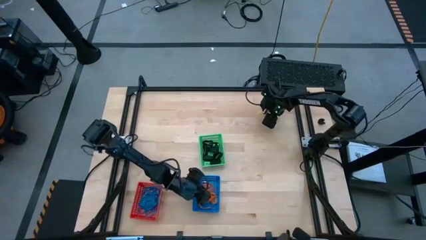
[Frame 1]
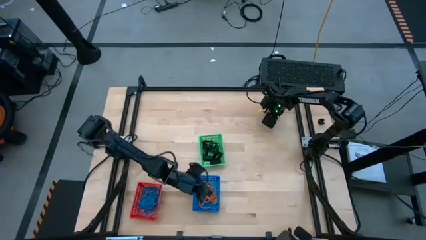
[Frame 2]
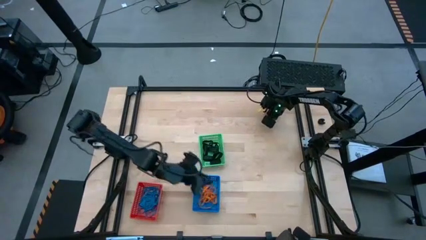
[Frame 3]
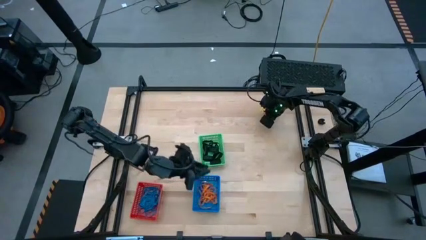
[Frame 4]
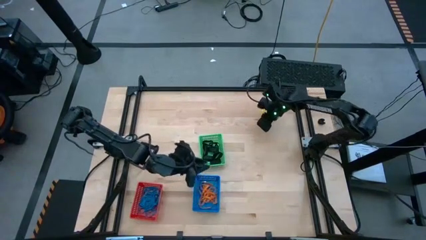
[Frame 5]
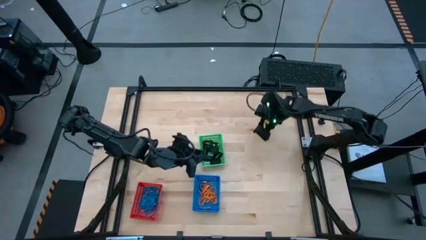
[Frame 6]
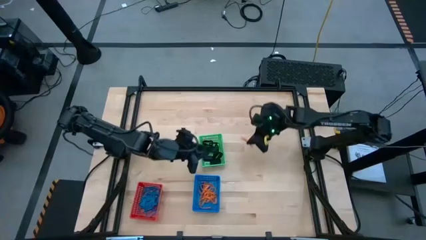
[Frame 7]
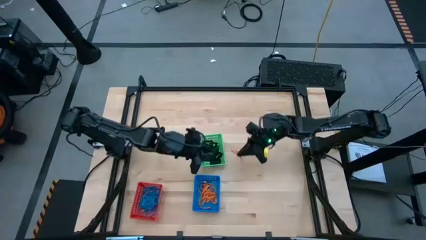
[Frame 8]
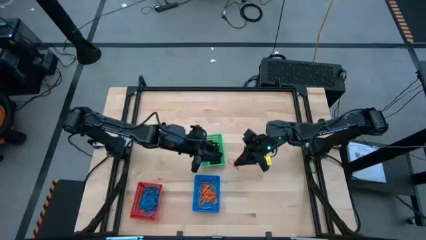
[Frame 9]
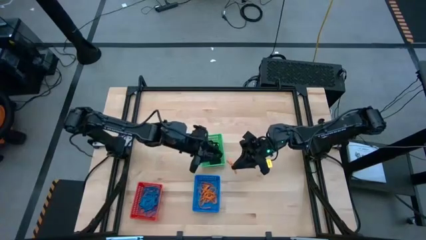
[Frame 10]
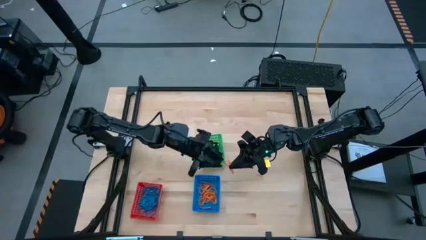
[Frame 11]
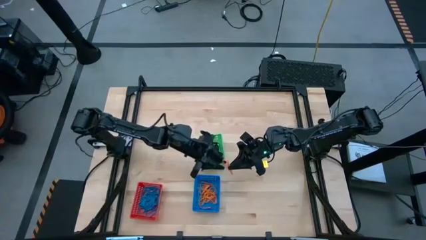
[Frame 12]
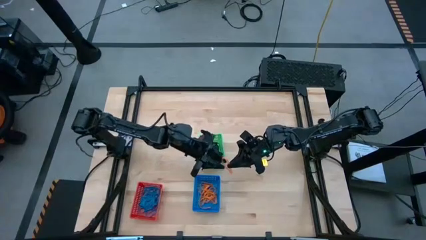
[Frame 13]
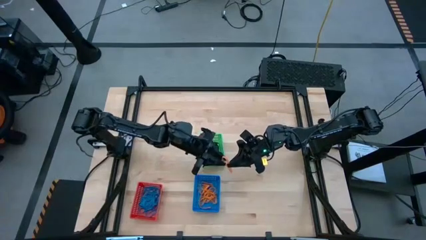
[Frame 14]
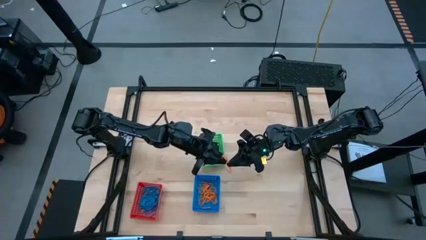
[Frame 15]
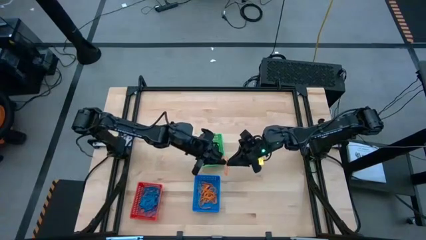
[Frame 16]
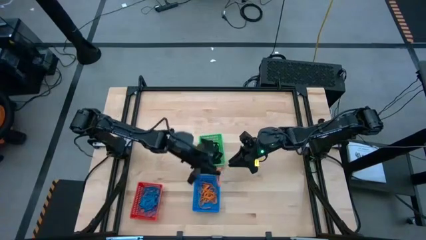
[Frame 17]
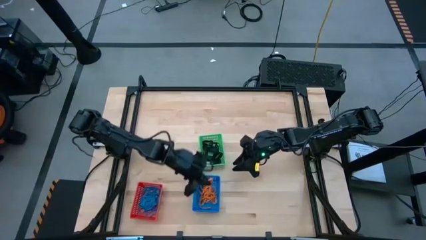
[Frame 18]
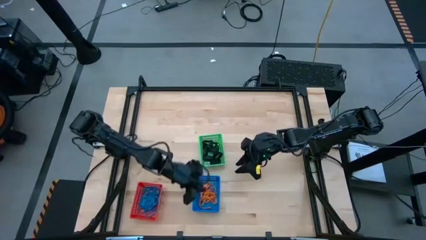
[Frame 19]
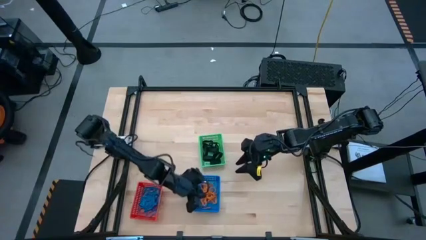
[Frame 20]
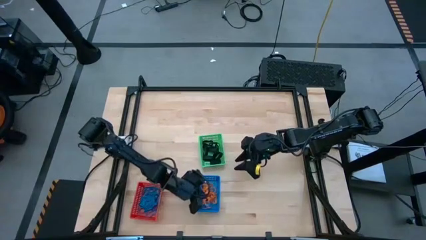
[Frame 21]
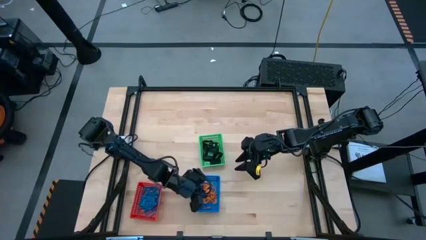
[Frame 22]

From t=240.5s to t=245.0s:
Task: Sort rubber bands into baskets
Put the orange rubberband into the blue bin

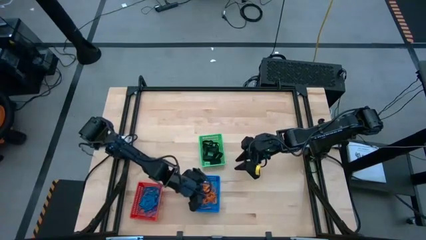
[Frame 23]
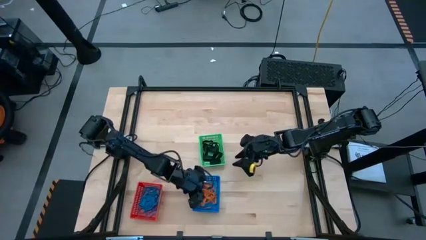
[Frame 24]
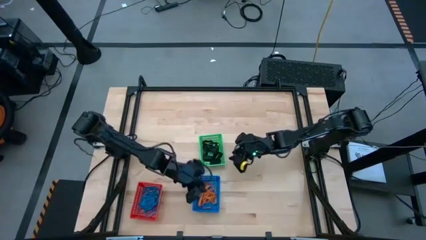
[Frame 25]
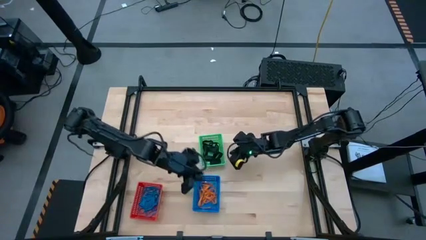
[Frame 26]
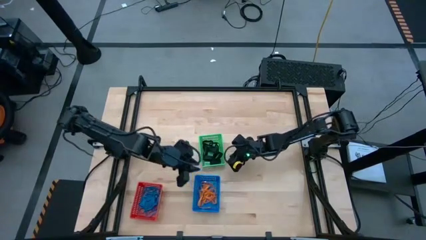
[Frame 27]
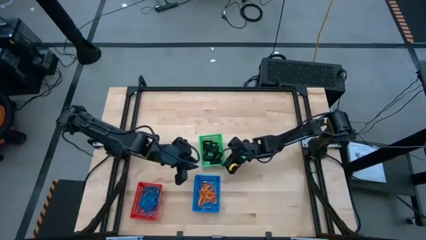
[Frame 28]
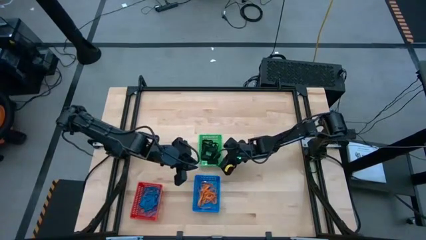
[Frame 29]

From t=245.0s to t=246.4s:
Adjust the green bin

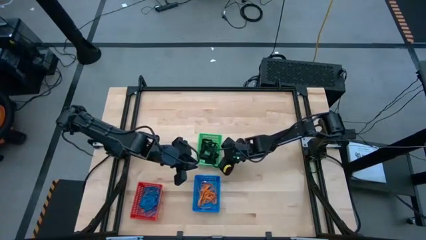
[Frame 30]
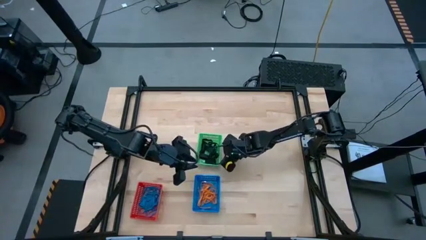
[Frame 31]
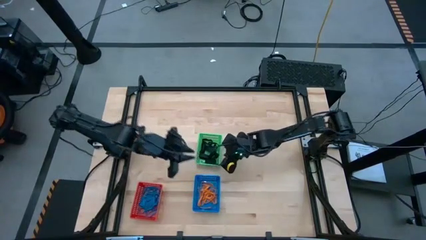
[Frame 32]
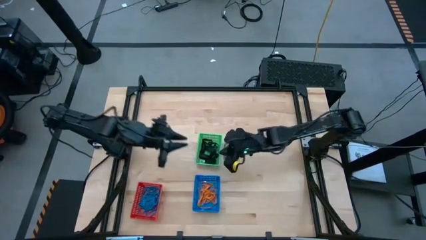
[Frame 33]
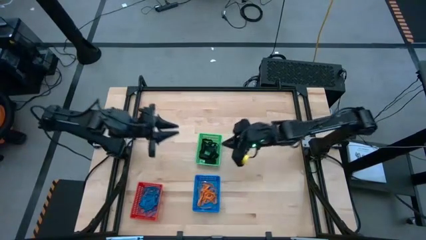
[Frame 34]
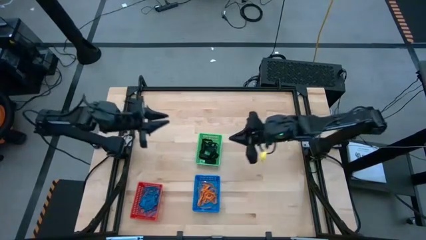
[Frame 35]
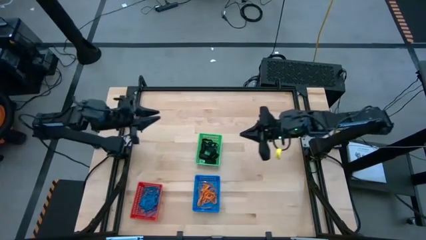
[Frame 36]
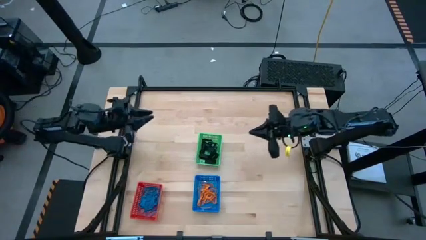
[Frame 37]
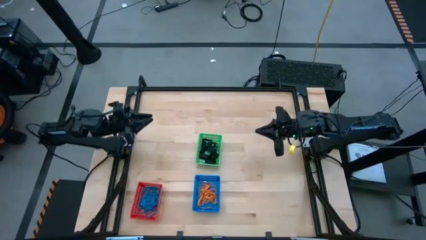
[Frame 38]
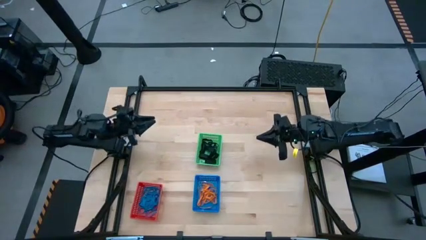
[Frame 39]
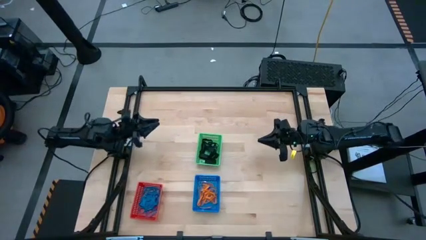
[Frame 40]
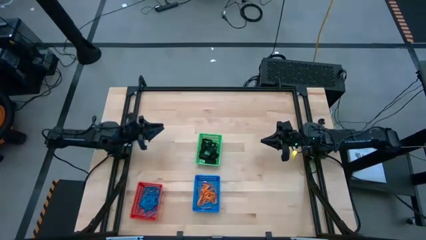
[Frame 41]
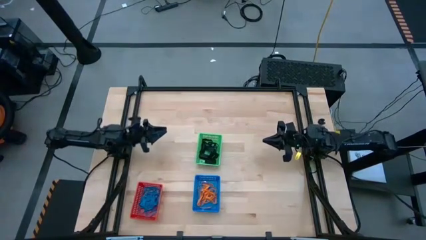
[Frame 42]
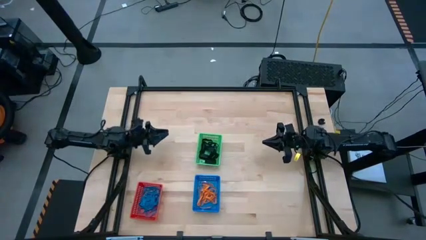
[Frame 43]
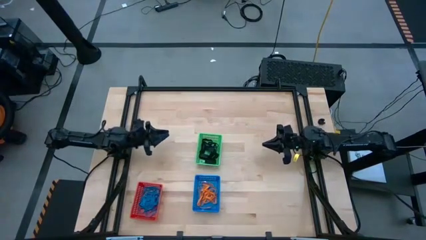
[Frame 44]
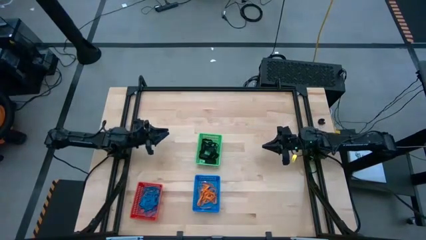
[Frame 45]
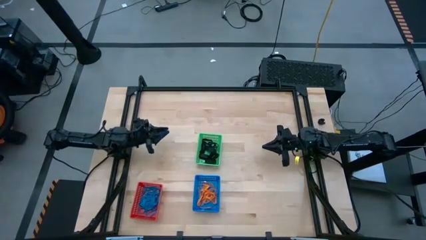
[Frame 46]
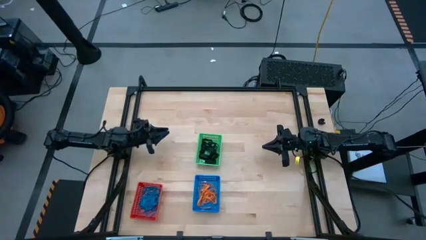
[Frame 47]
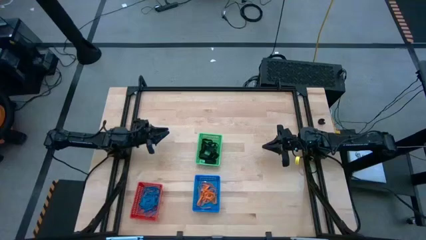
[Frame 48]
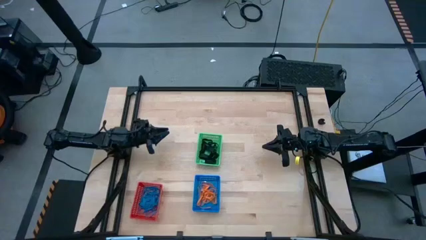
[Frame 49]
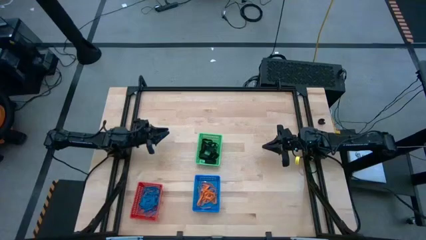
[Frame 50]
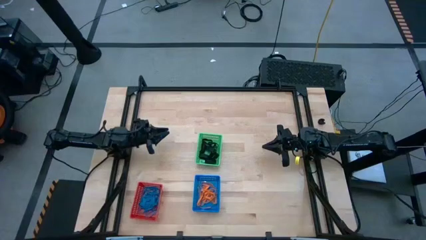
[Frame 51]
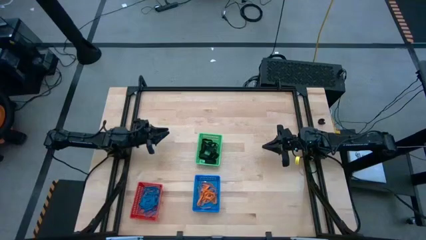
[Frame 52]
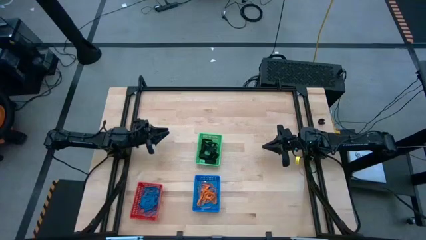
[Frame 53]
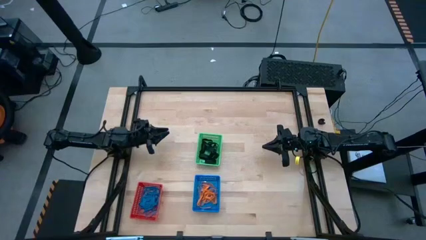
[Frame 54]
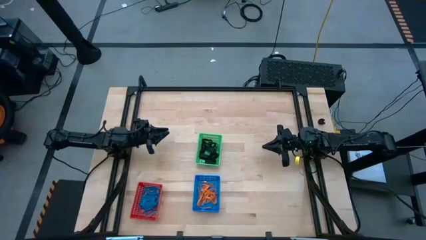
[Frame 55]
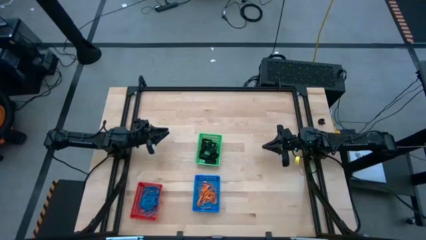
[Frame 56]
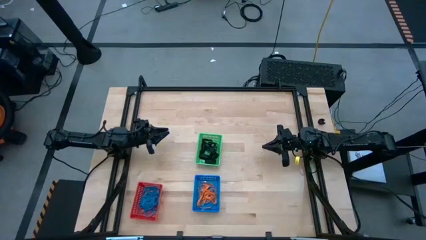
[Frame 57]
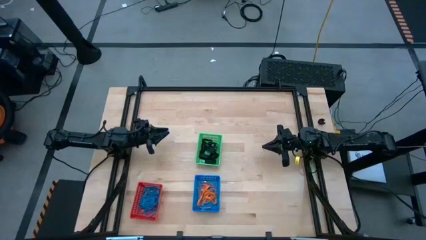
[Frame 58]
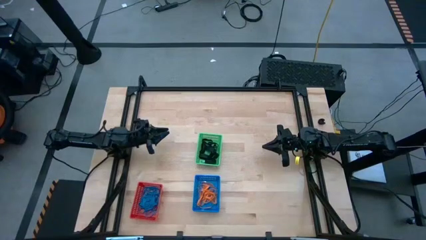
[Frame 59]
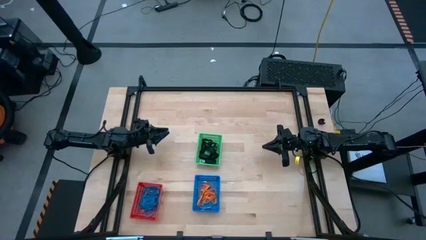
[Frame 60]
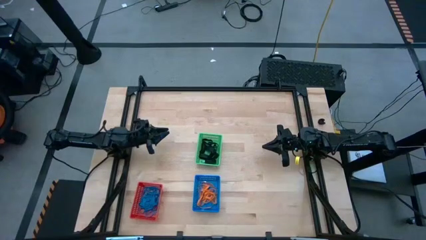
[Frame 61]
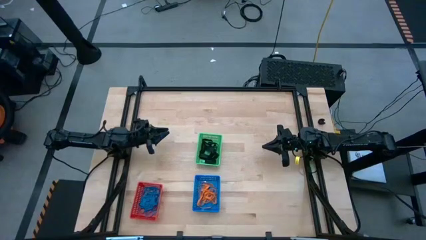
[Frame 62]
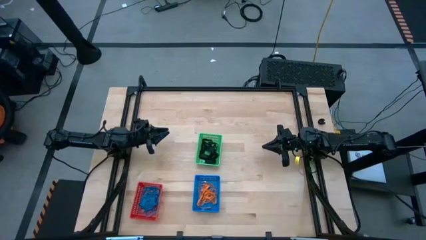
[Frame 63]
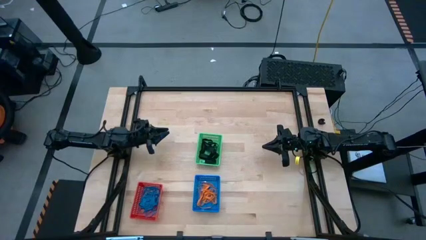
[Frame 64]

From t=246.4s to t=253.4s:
Return to Home Position

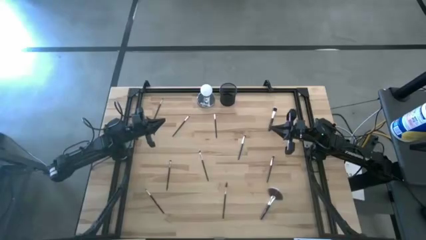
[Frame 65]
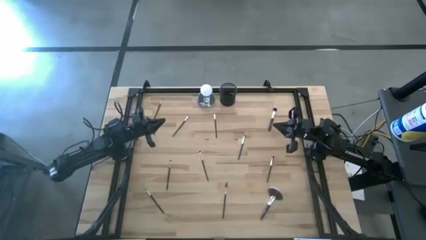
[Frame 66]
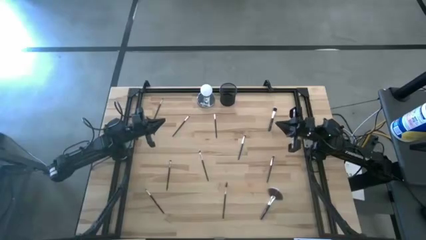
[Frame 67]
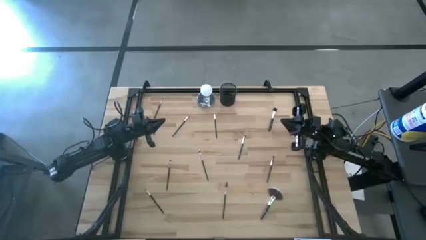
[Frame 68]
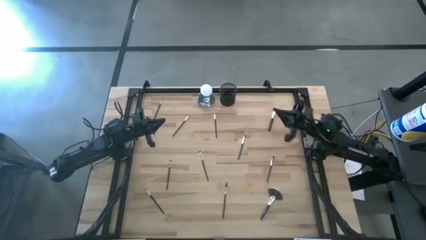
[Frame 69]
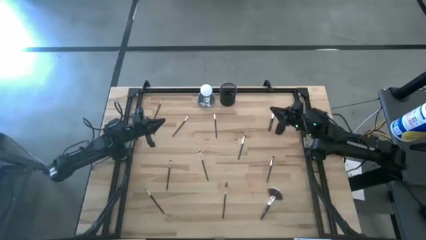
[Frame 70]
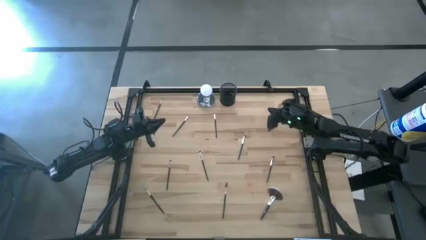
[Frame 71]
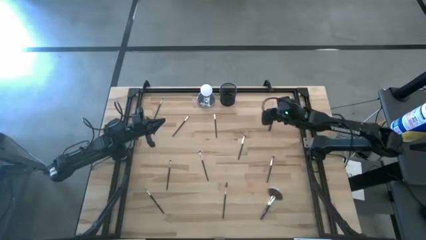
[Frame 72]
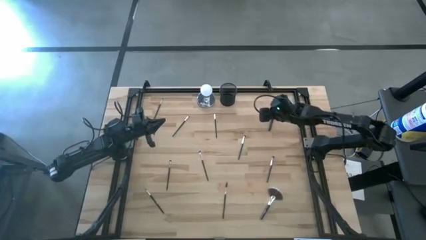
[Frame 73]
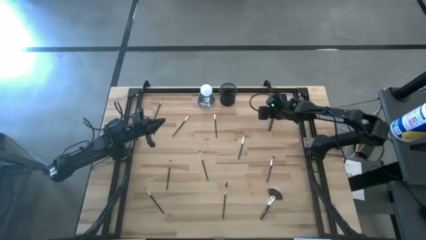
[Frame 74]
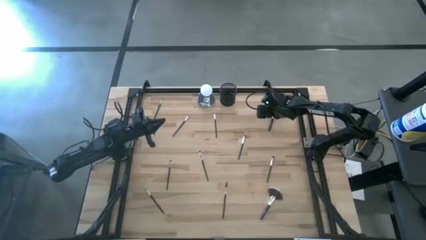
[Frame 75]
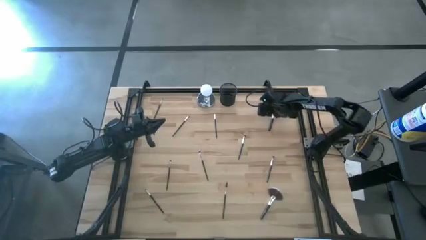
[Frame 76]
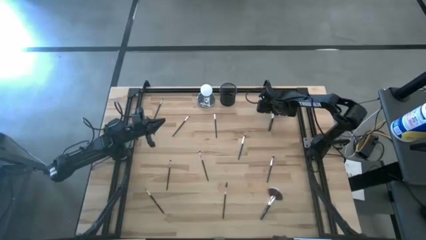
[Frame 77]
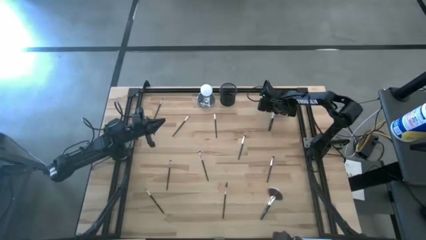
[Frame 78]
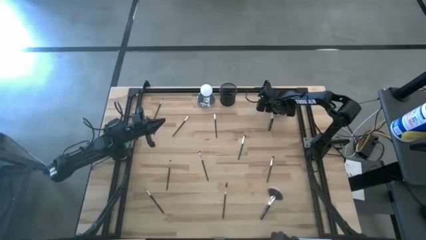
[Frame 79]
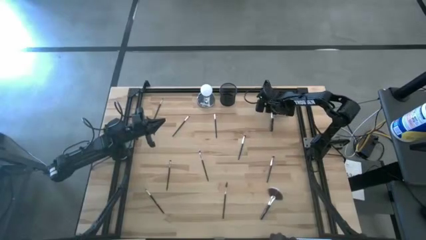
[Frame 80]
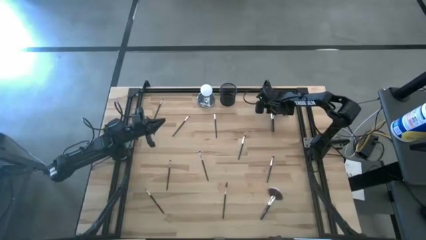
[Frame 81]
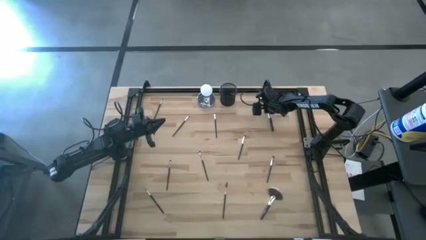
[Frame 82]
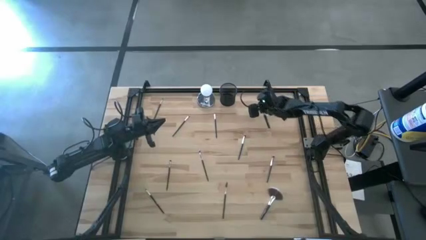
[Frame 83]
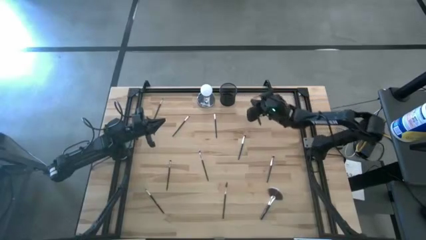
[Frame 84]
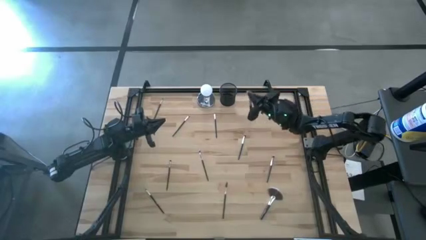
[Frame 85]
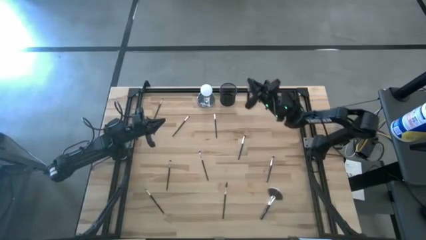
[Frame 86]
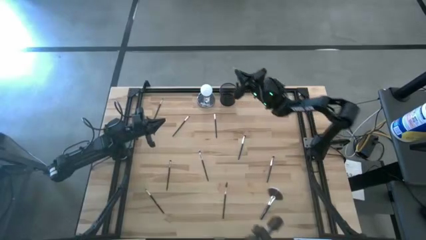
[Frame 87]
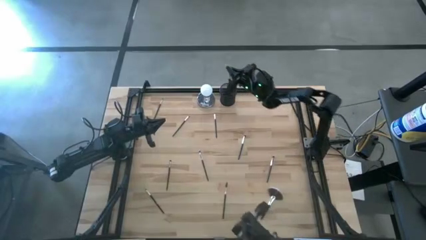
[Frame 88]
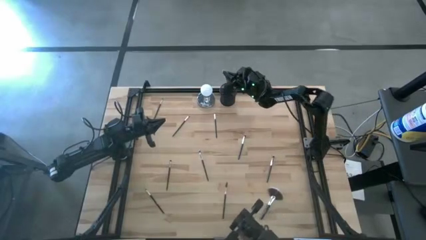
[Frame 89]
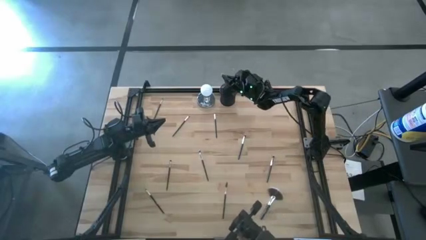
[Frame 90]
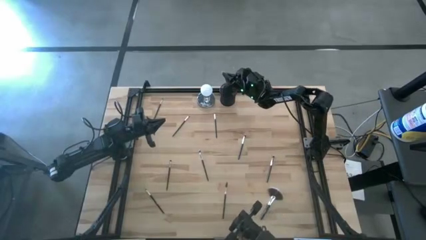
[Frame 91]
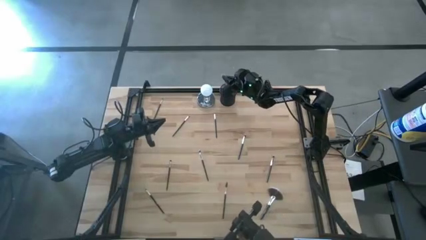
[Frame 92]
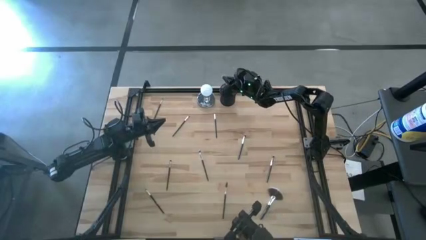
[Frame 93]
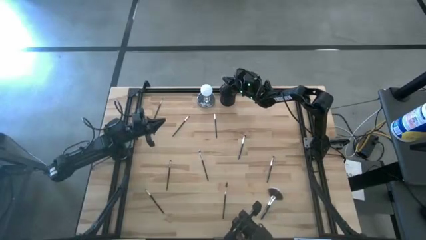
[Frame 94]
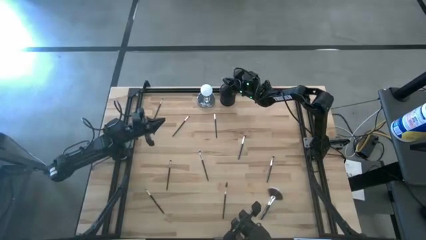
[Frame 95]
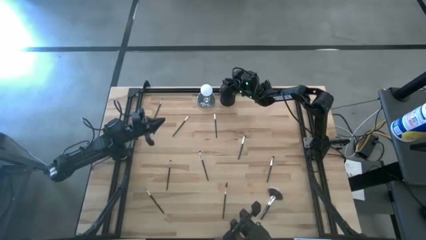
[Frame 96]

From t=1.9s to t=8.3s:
Task: Pick & Place Makeup Supplies
Put the makeup brush into the black makeup holder
